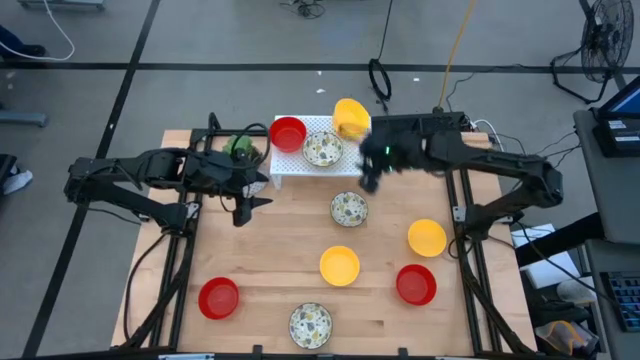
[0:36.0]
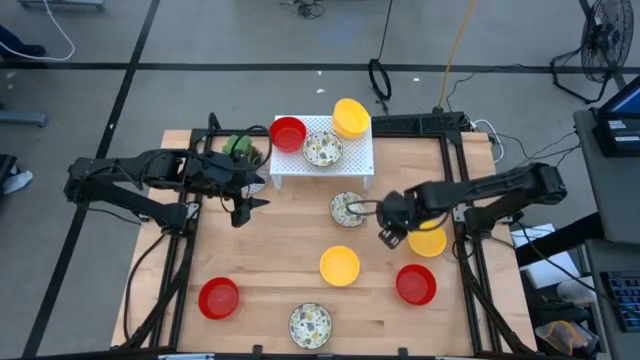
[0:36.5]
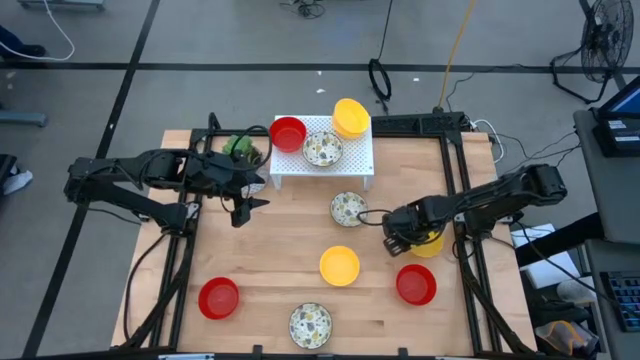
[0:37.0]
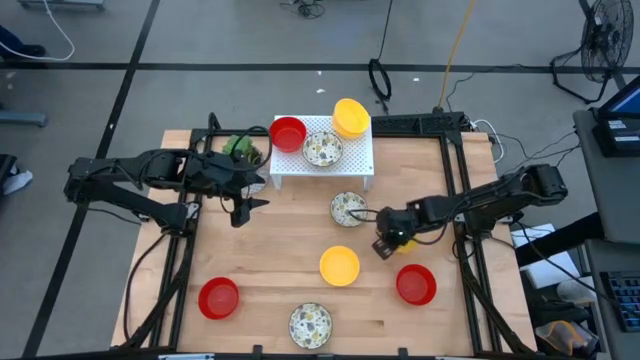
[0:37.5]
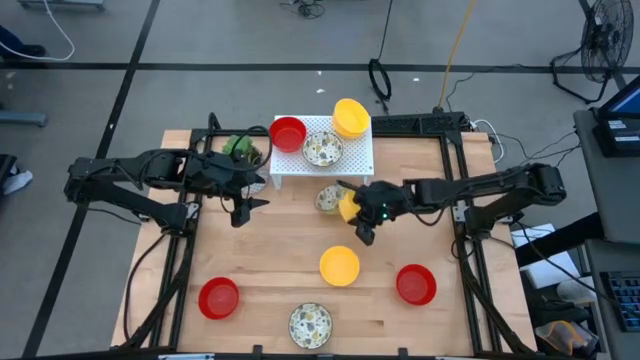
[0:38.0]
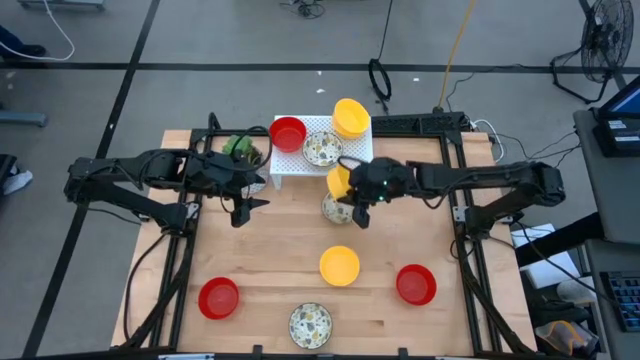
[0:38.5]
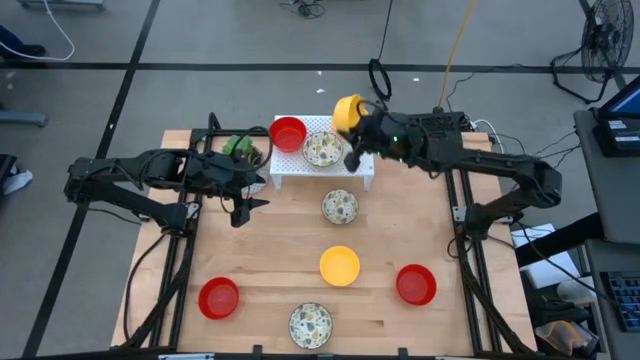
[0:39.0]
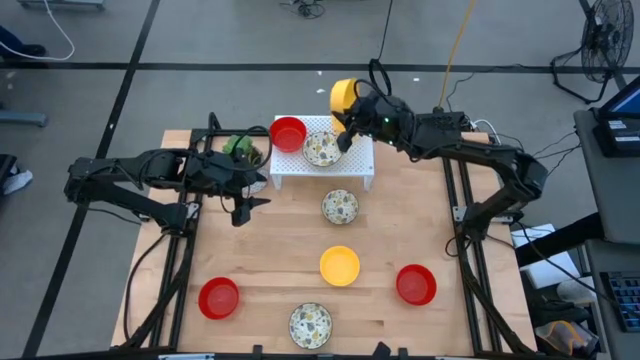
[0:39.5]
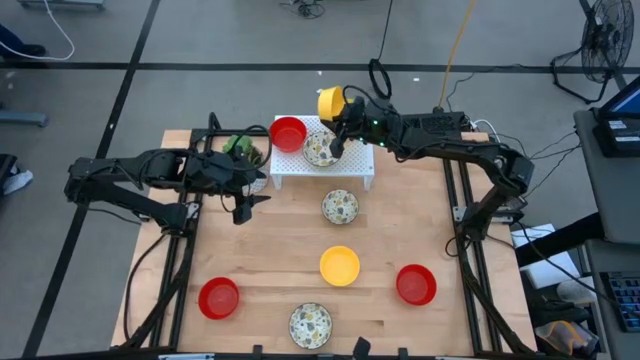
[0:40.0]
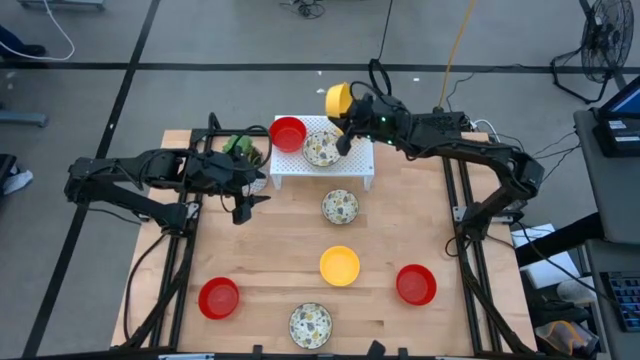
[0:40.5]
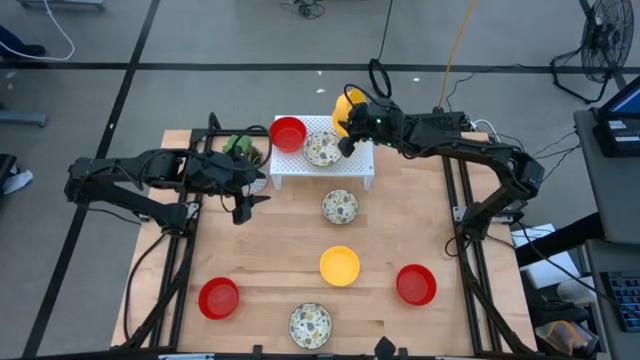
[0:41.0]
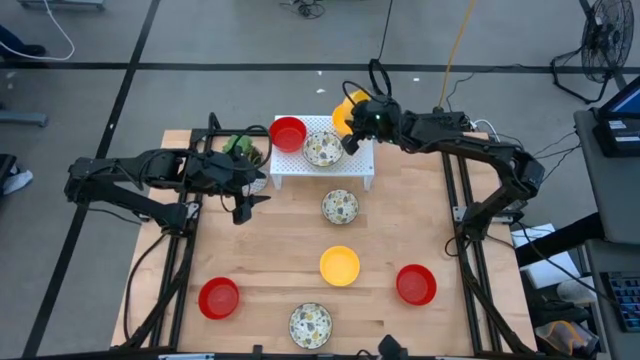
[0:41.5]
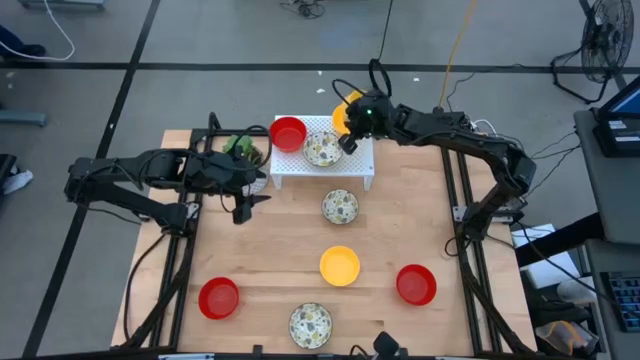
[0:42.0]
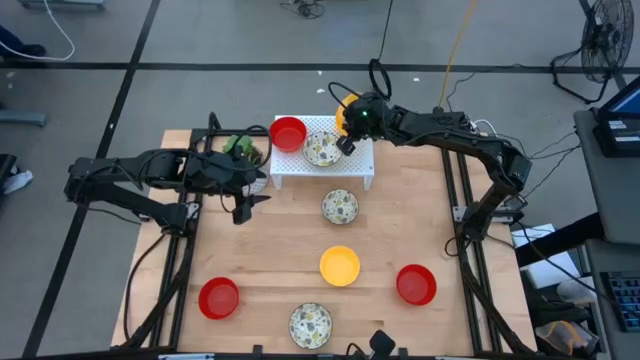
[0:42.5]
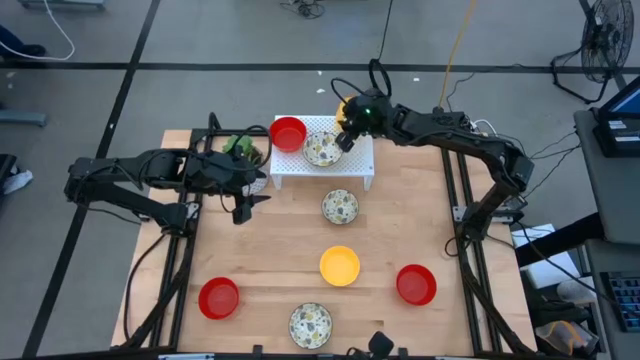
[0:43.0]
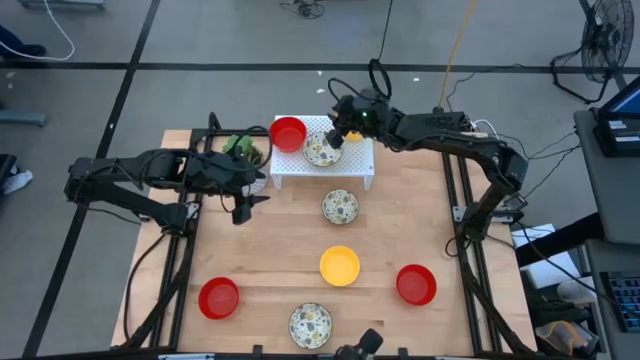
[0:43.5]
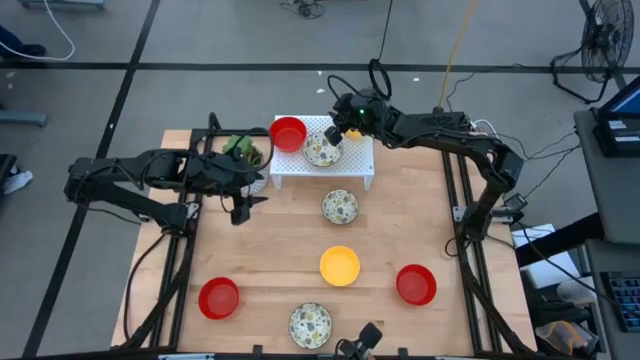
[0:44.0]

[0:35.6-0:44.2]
Task: Pick & Place Mini bowls
Stack the yellow bowl on the yellow bowl on the shelf

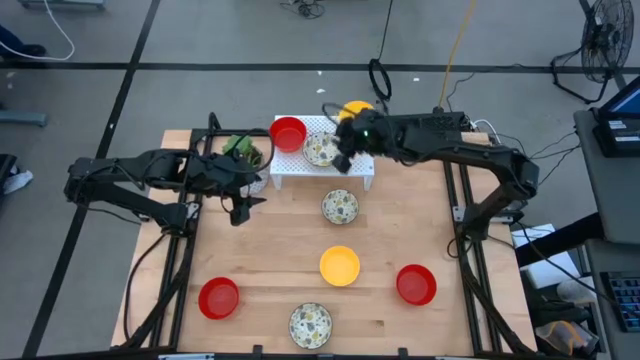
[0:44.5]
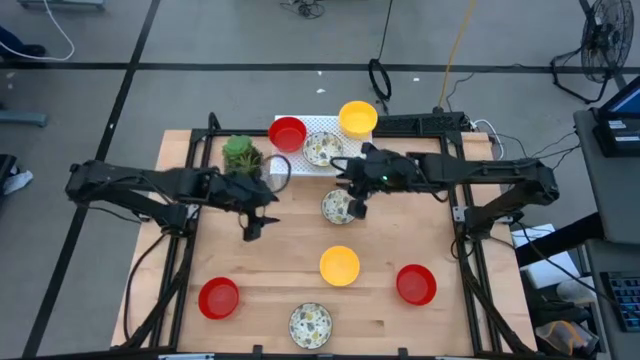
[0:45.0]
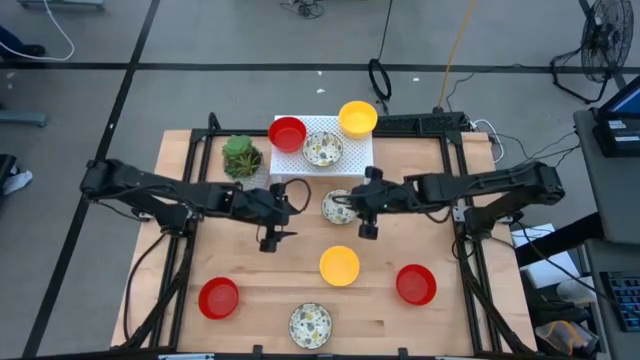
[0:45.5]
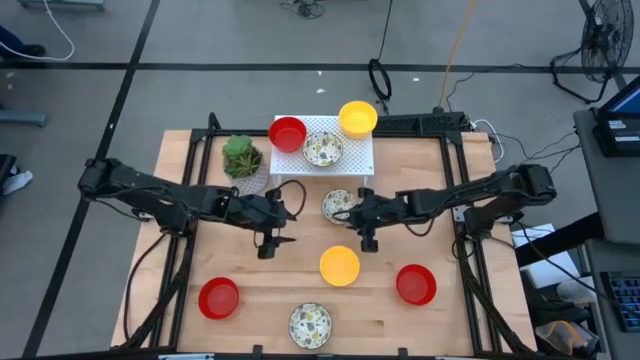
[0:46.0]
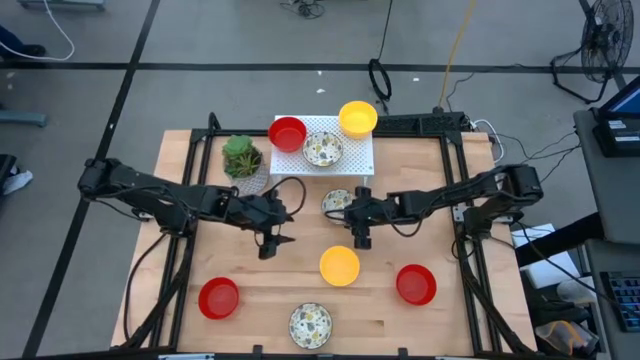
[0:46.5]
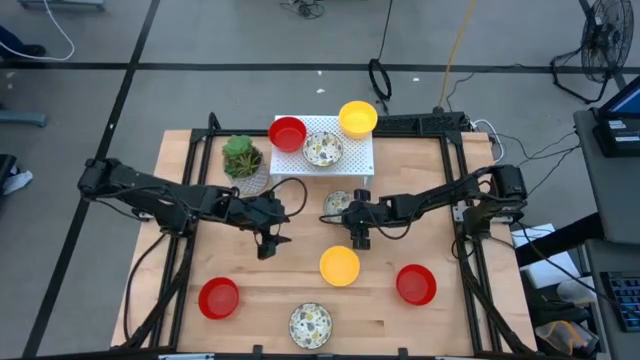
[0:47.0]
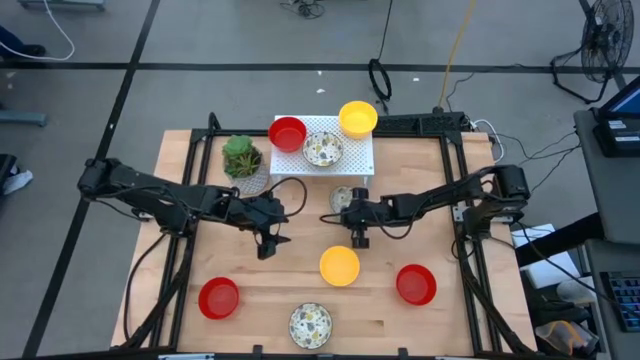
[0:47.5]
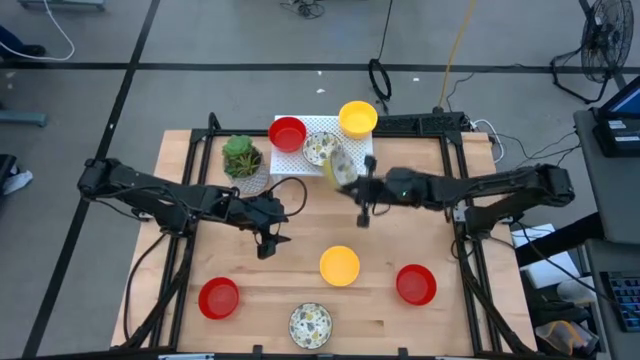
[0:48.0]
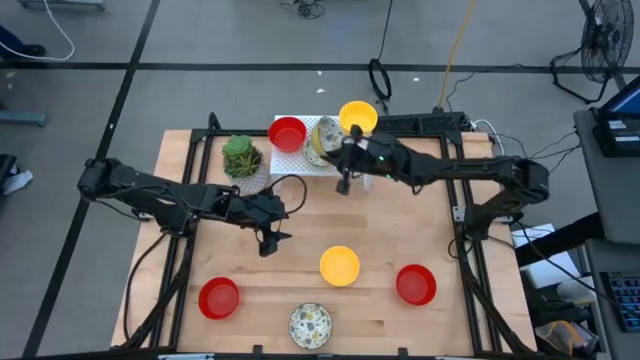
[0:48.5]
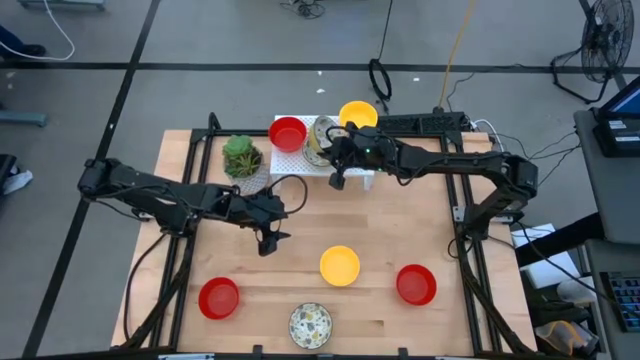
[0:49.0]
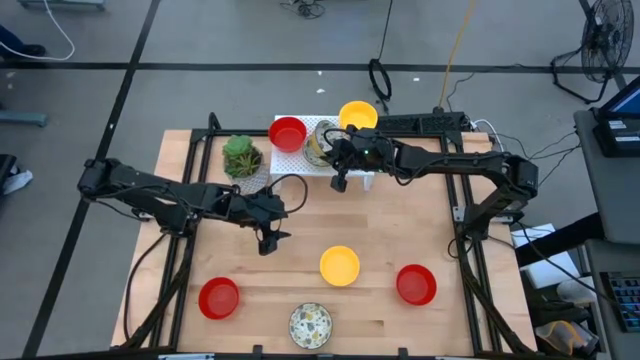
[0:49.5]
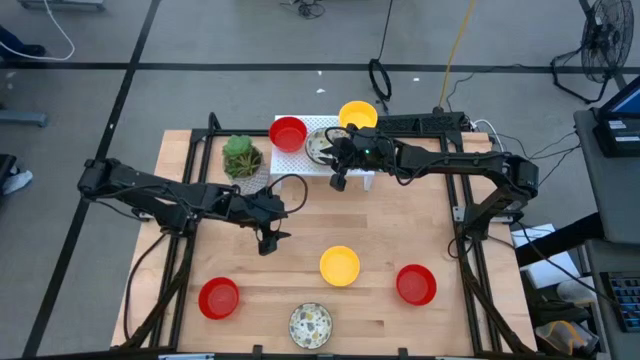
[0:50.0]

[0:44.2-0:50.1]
Stack the white patterned bowl on the white patterned bowl on the shelf

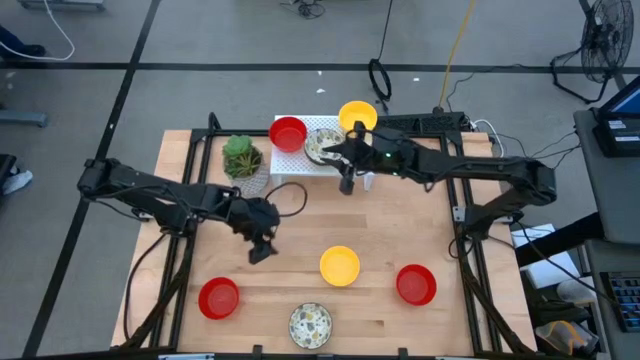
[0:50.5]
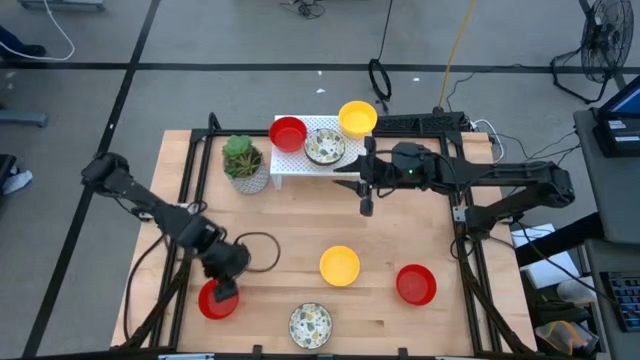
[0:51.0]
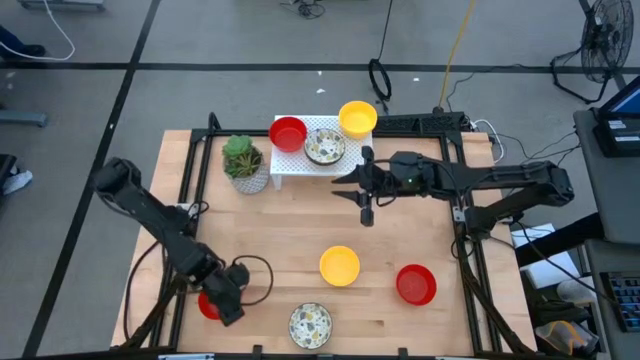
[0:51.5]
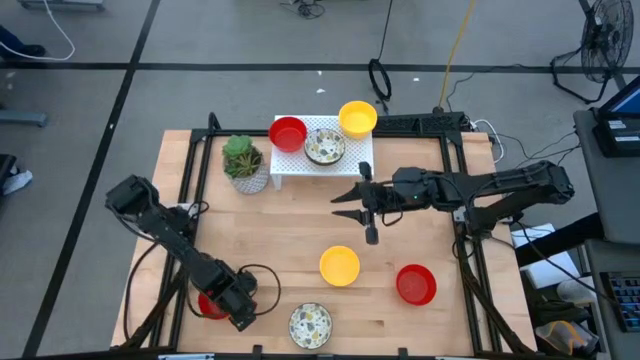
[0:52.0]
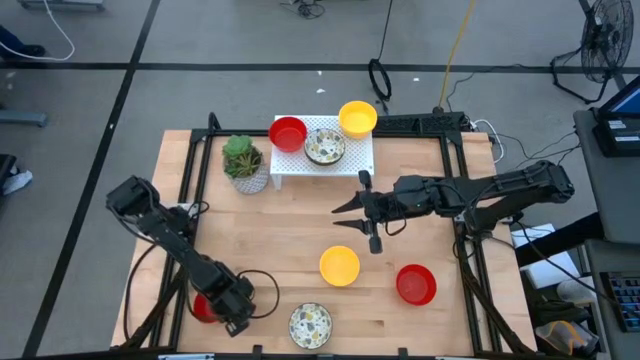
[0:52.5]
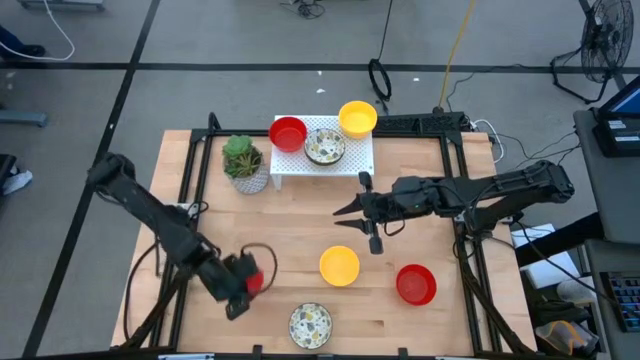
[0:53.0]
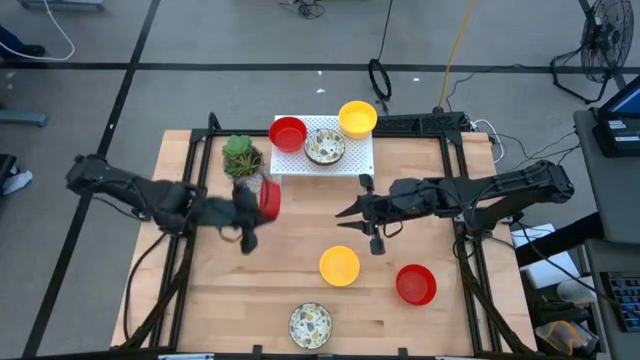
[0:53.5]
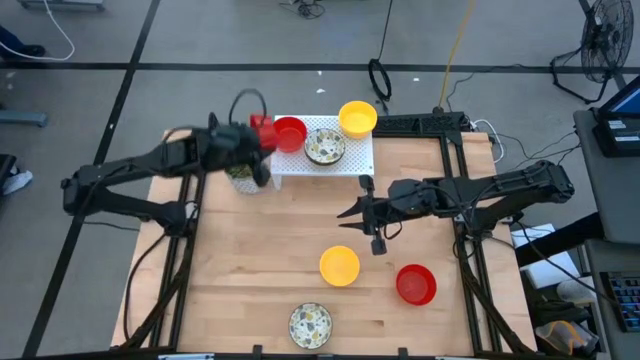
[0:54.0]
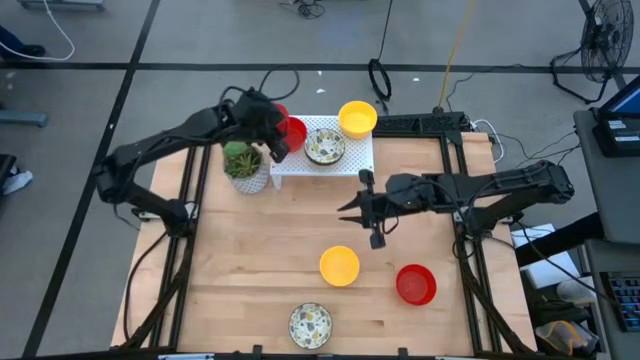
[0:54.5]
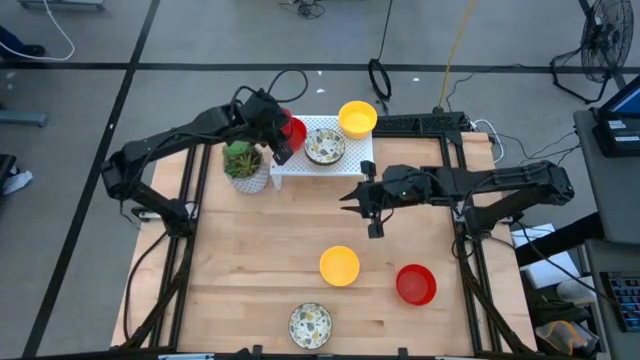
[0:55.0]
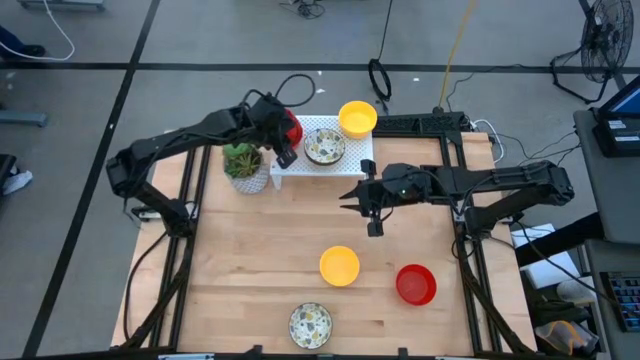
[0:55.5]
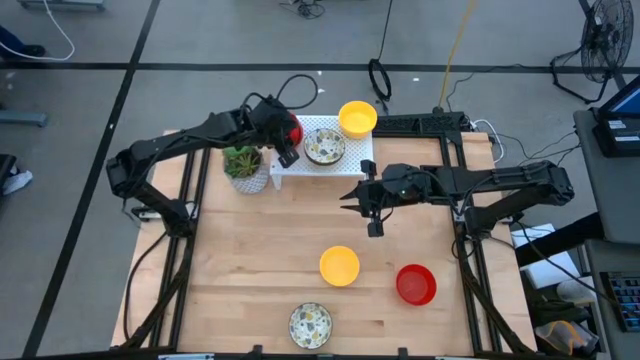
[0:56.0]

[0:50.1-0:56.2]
Stack the red bowl on the red bowl on the shelf
